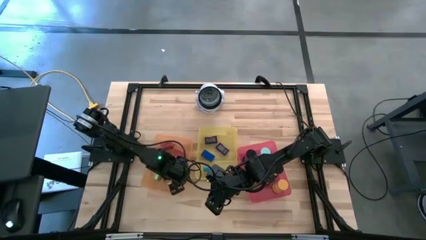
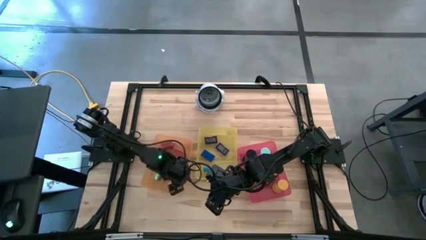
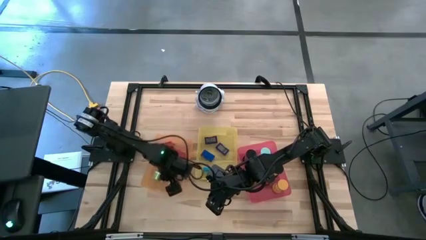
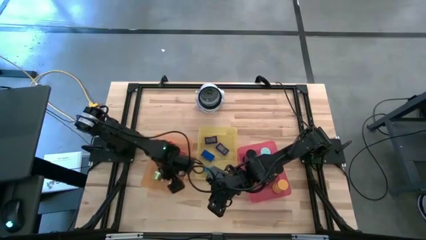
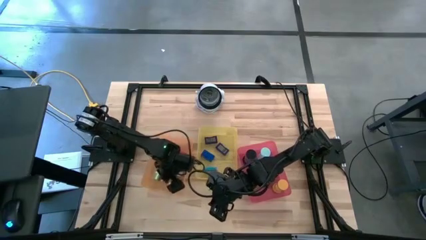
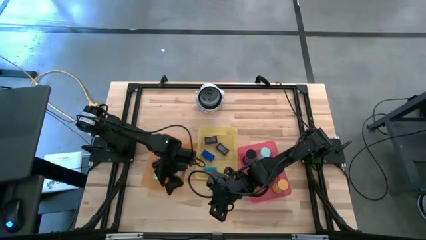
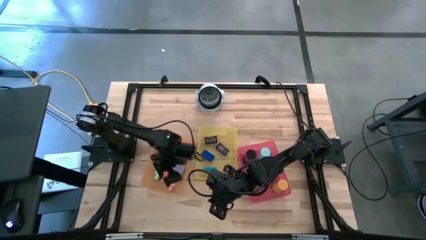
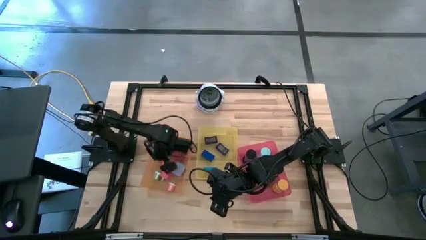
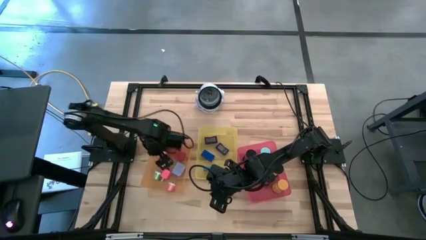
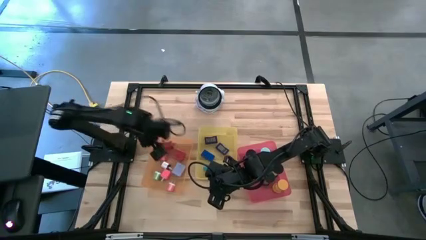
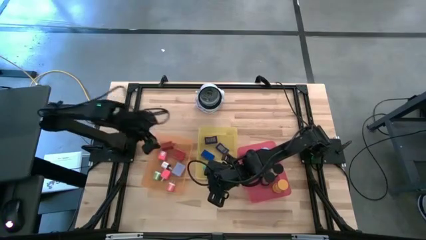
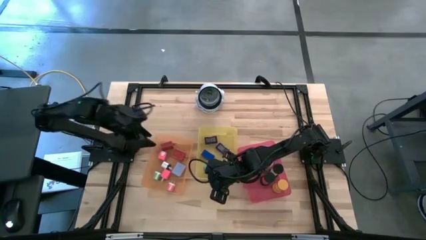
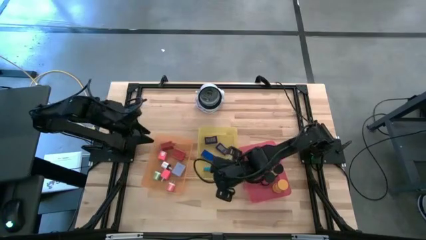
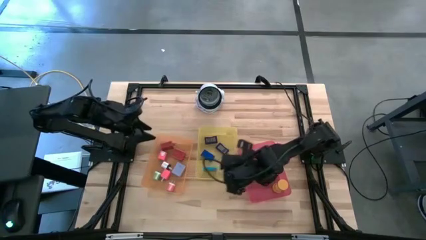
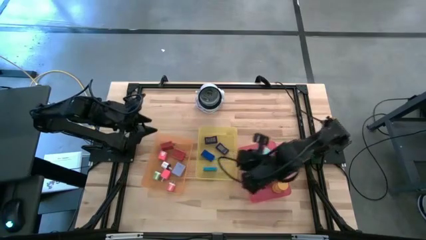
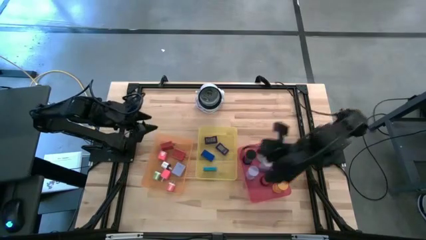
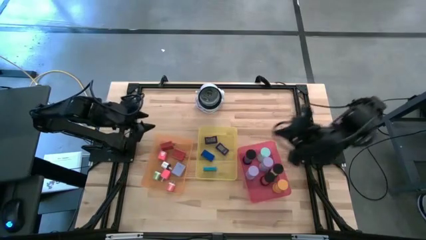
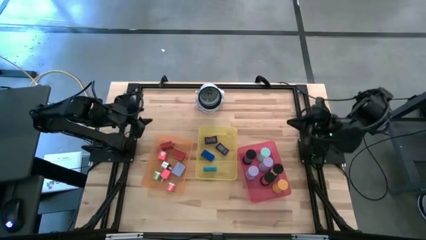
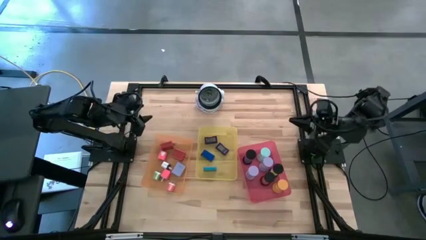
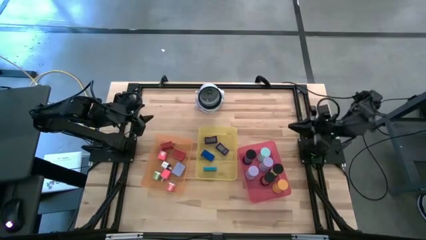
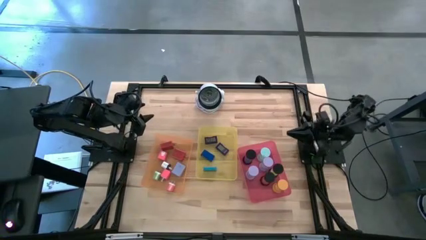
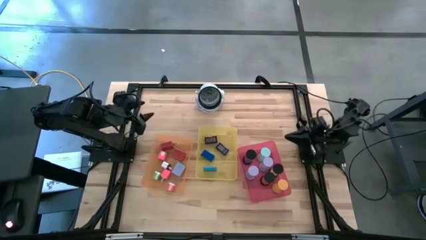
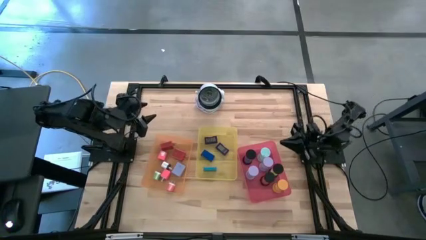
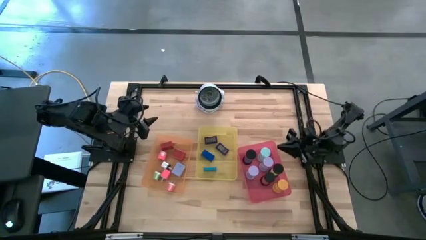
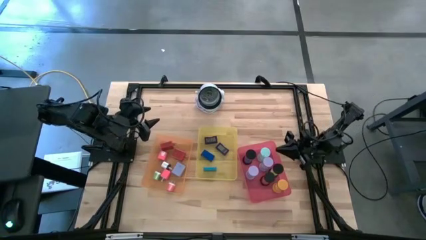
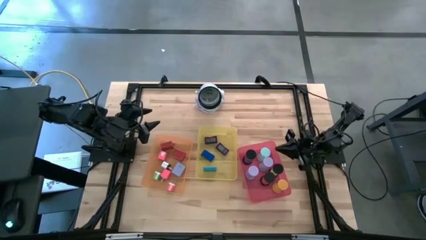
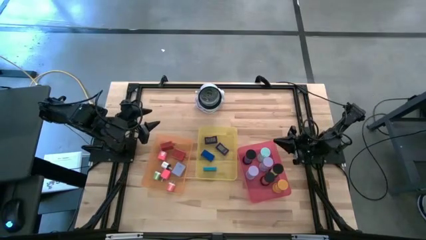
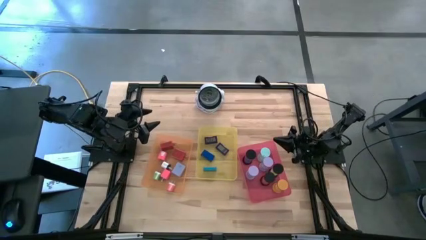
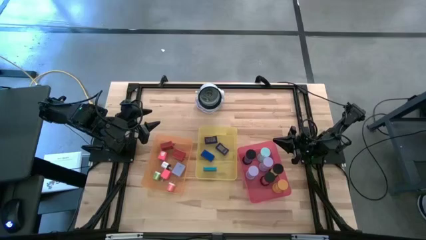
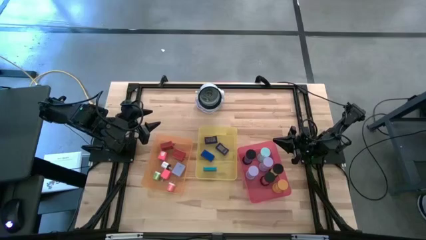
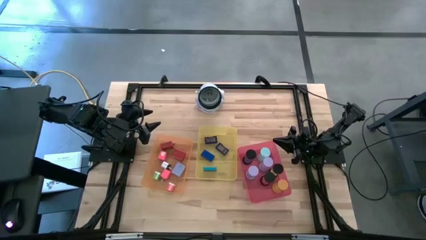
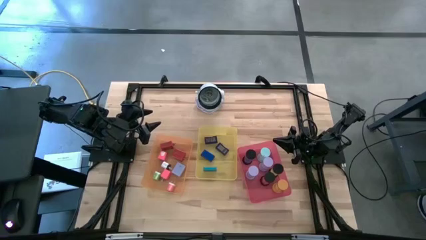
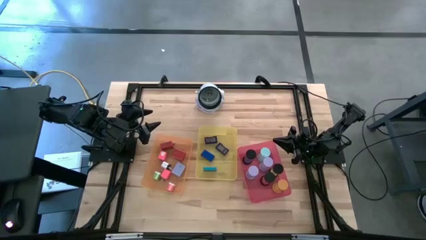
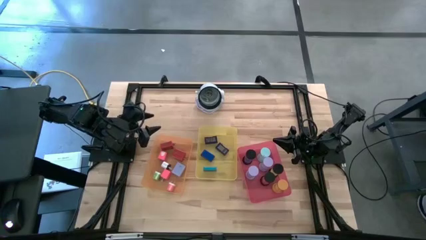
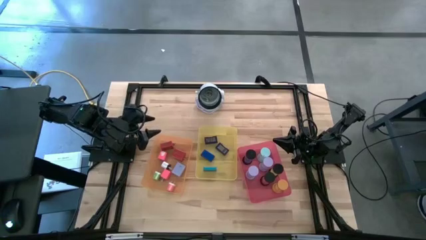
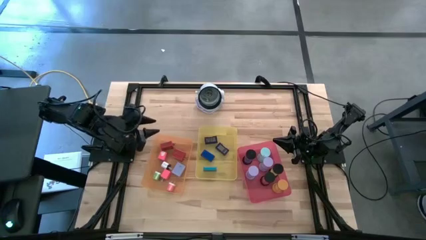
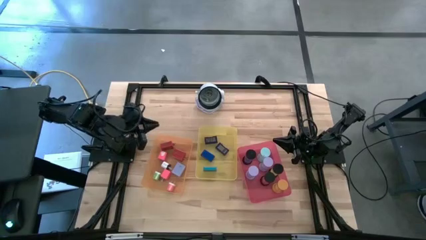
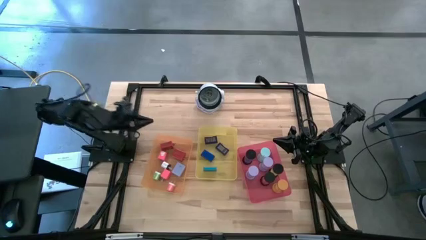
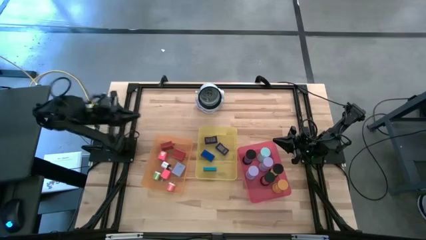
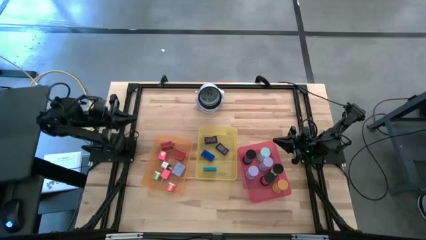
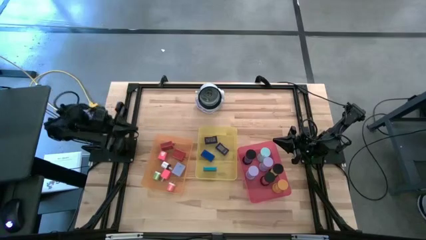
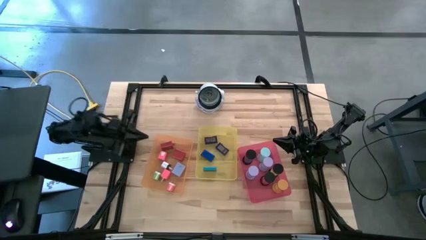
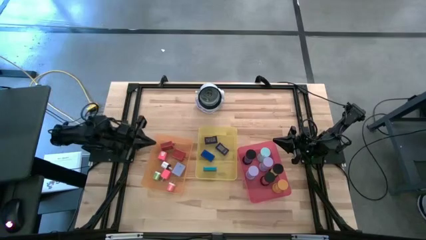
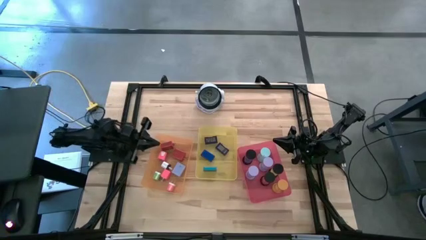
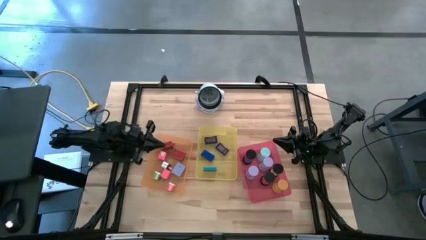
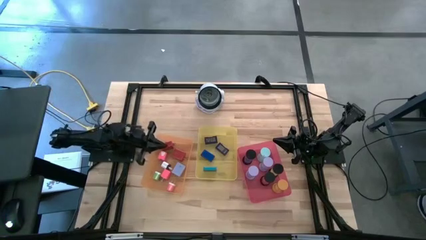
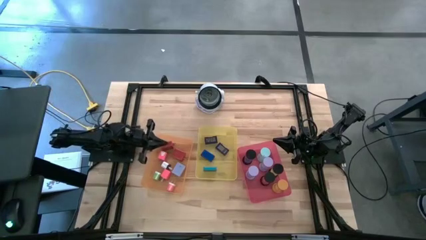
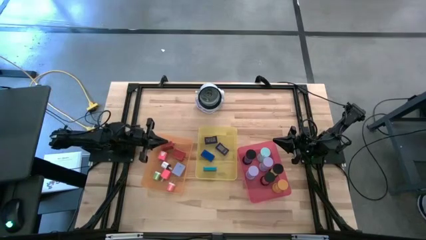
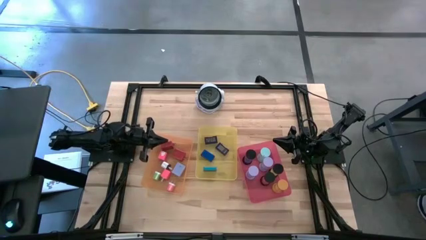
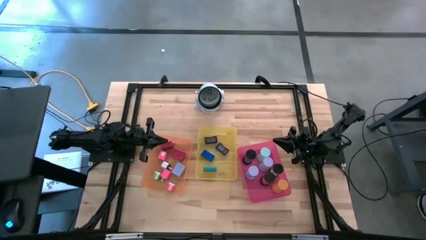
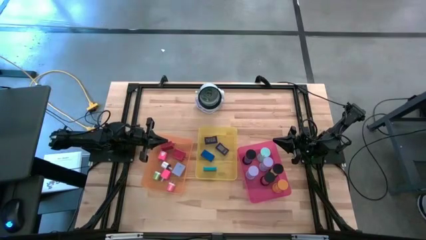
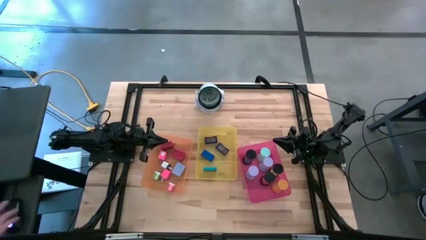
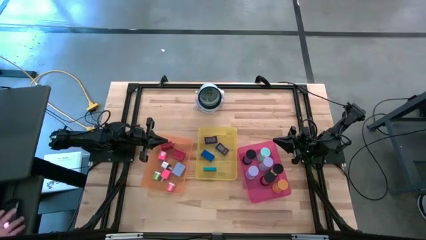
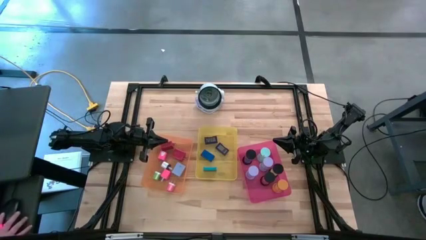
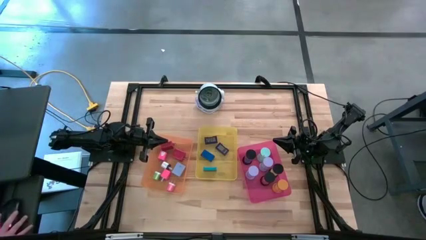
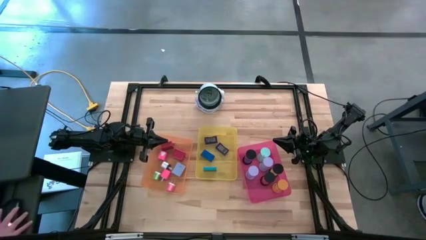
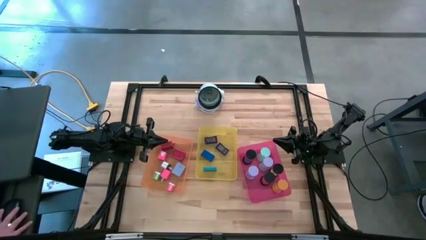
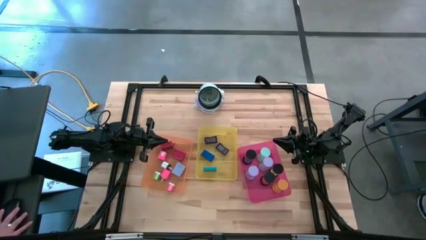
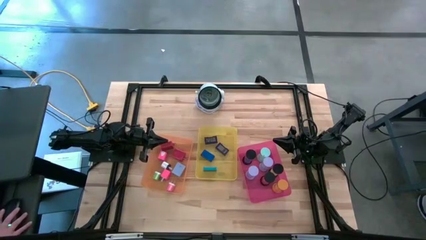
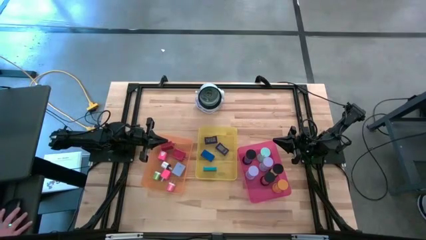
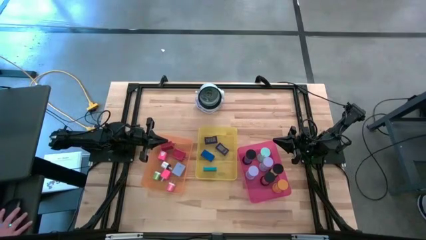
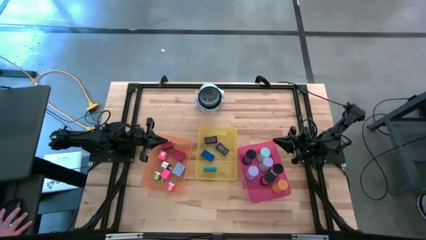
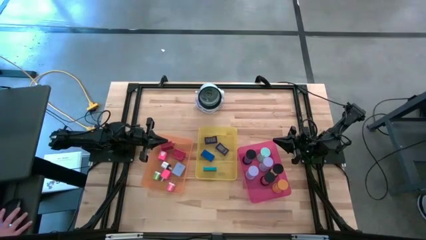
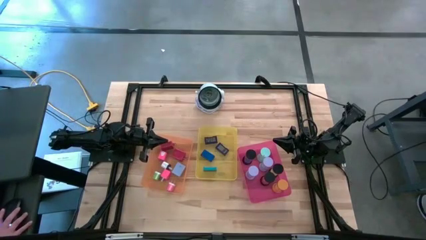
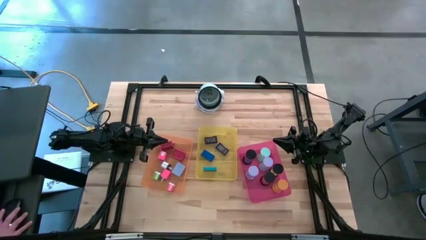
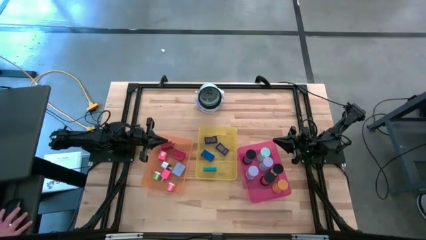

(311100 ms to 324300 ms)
Task: Pick & Place Office items
Return to Home Position
